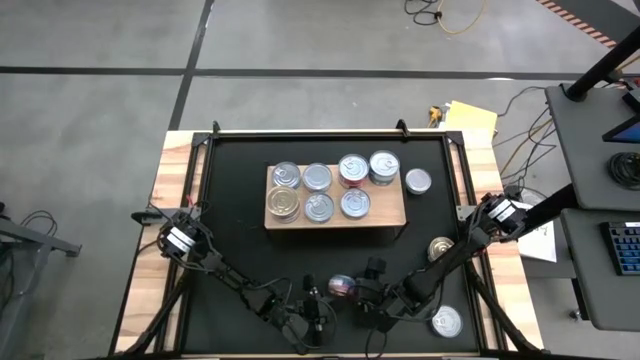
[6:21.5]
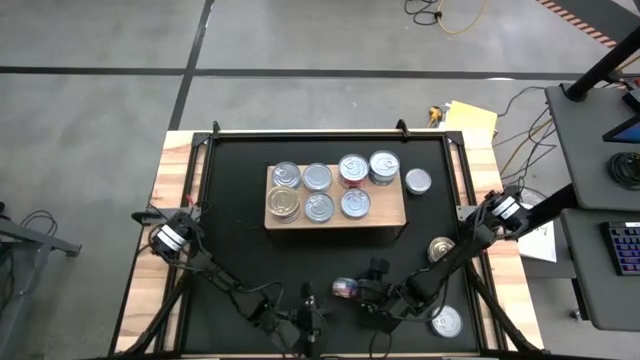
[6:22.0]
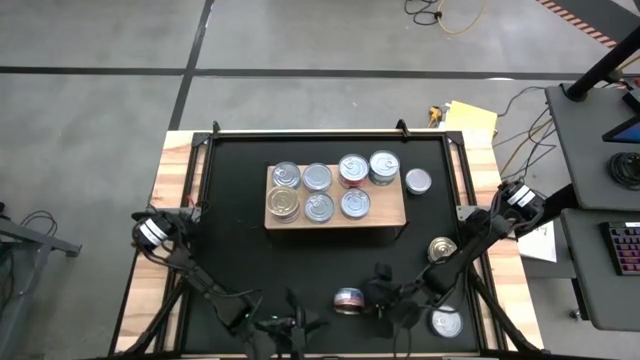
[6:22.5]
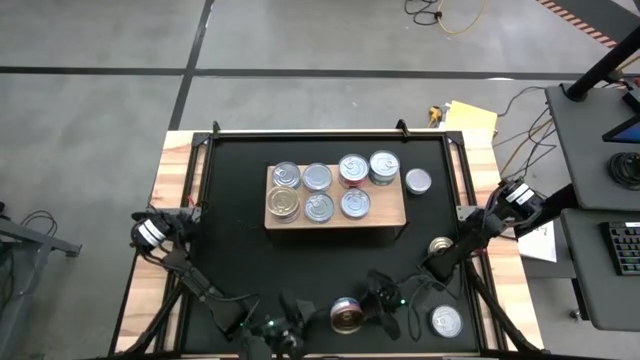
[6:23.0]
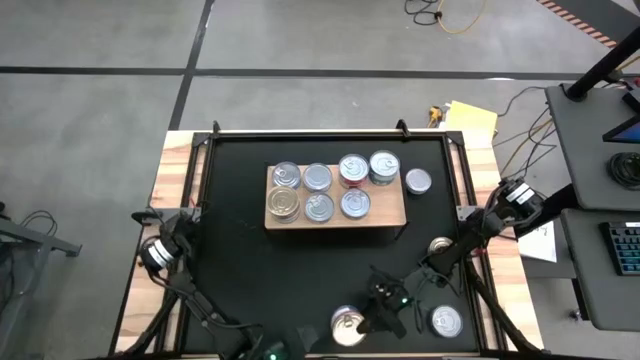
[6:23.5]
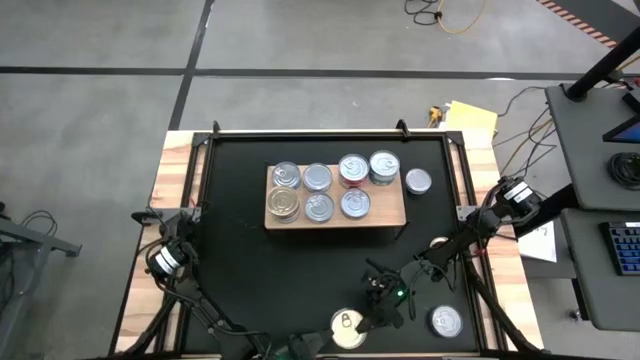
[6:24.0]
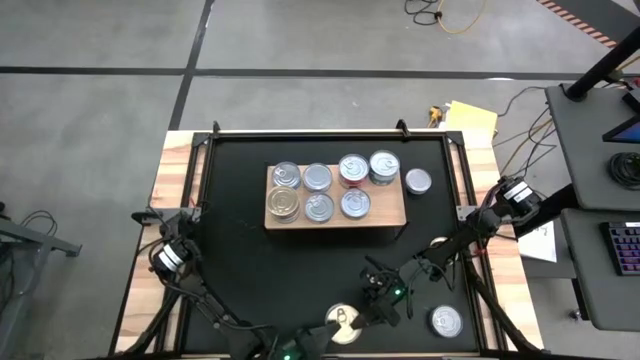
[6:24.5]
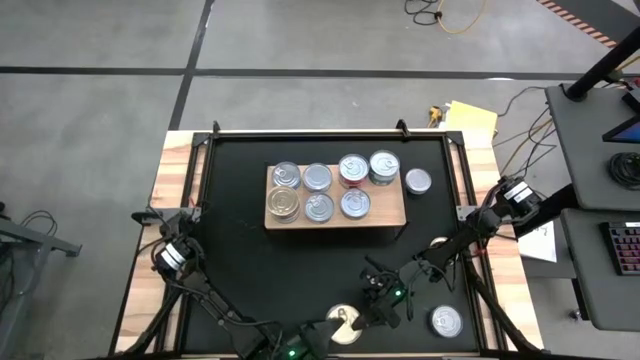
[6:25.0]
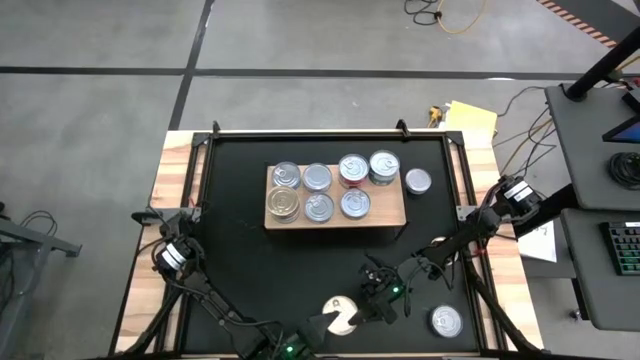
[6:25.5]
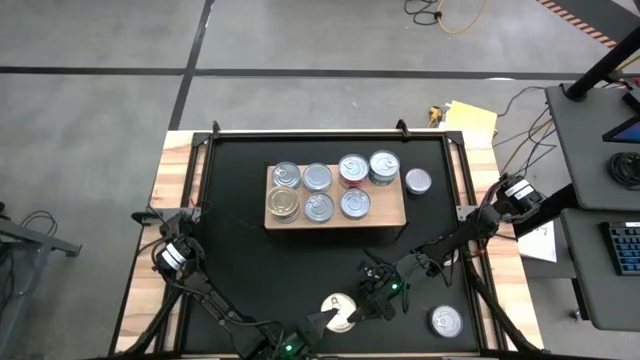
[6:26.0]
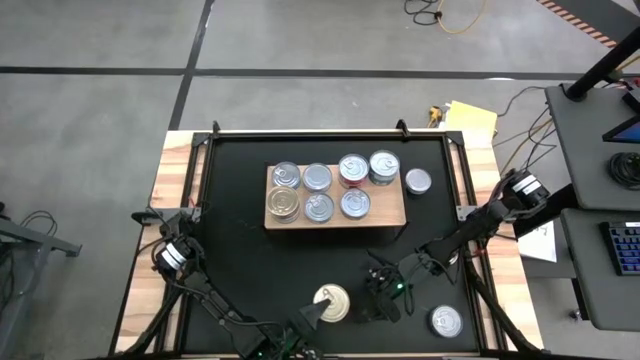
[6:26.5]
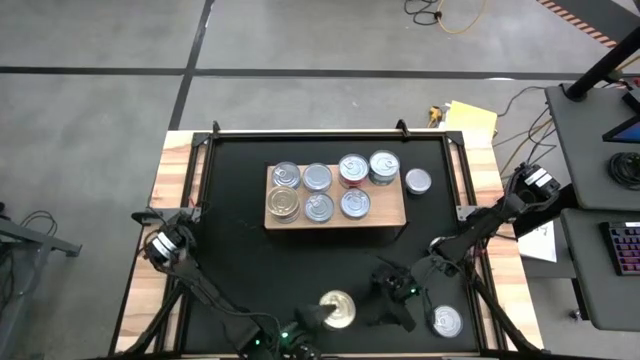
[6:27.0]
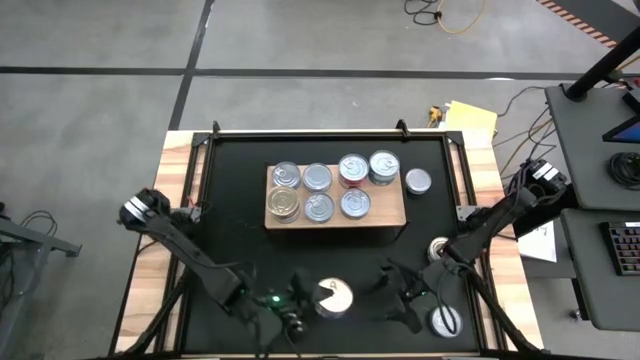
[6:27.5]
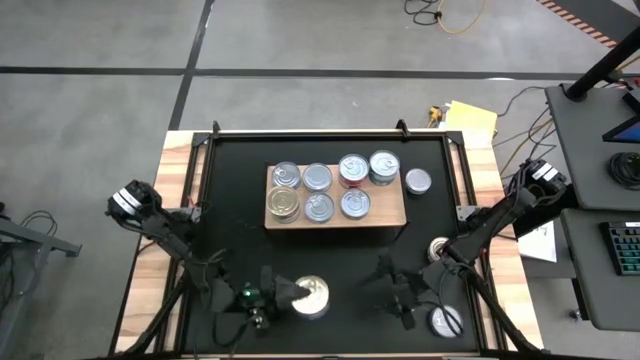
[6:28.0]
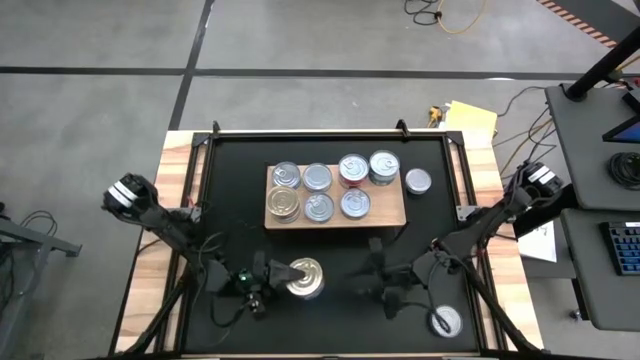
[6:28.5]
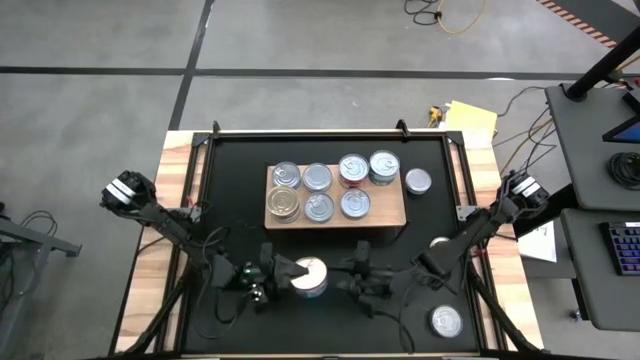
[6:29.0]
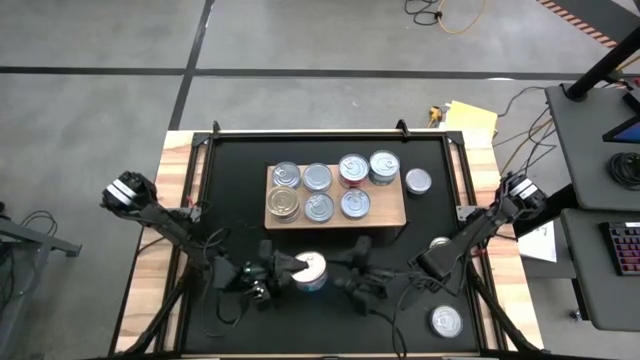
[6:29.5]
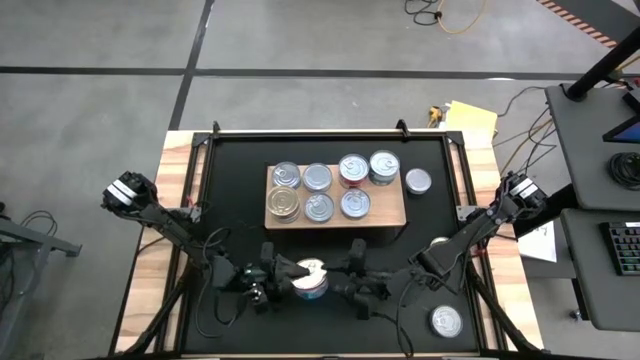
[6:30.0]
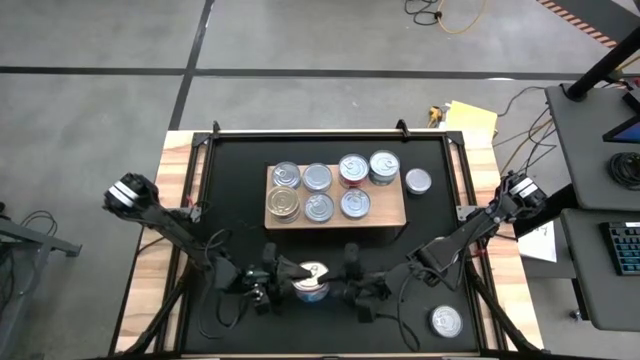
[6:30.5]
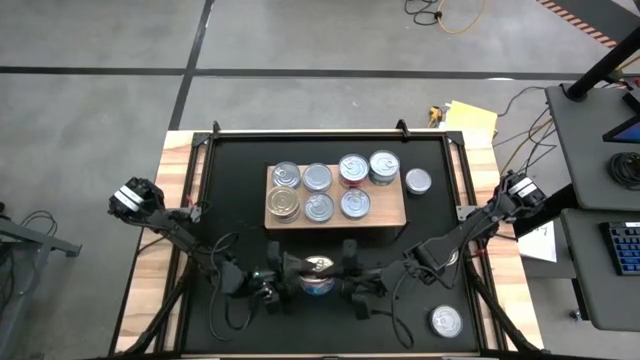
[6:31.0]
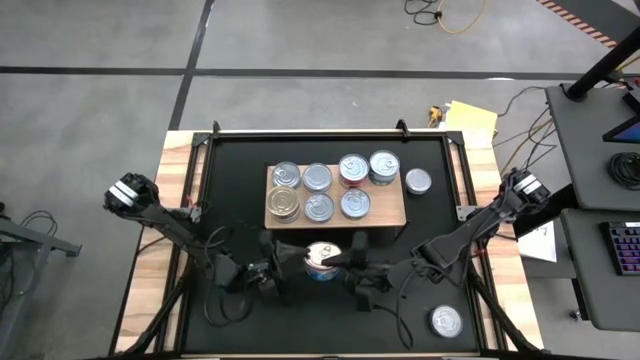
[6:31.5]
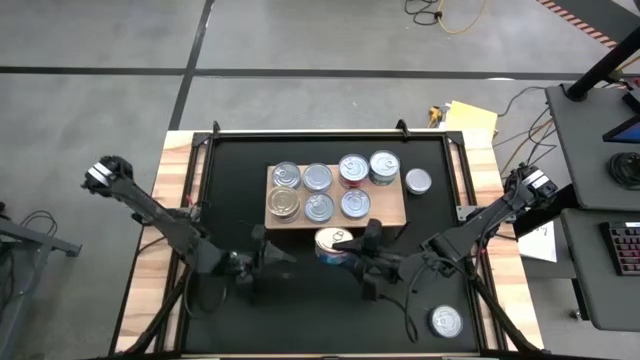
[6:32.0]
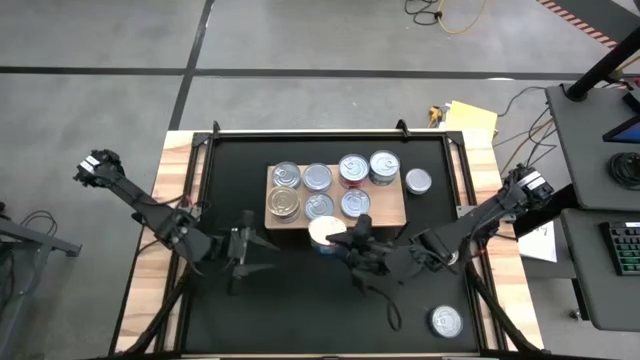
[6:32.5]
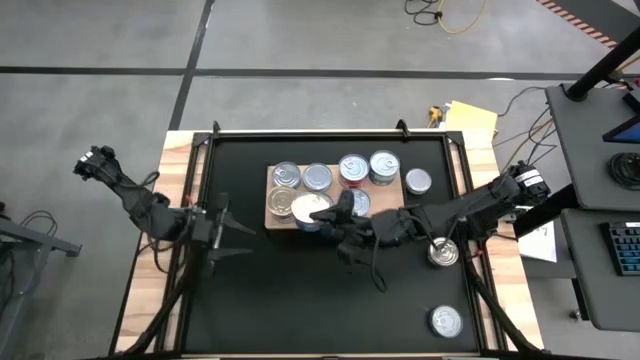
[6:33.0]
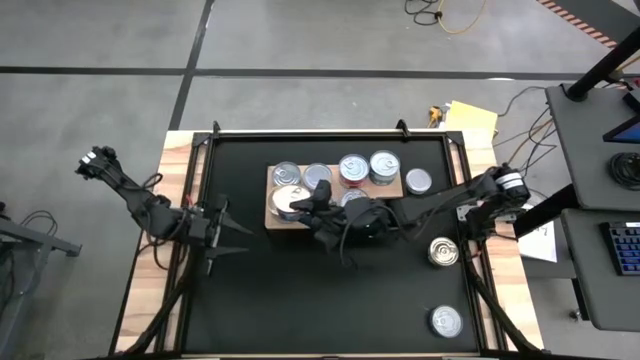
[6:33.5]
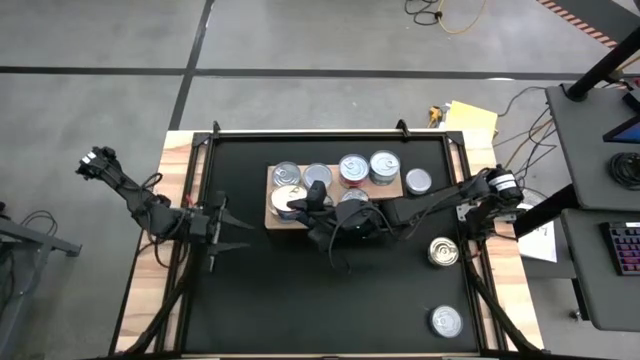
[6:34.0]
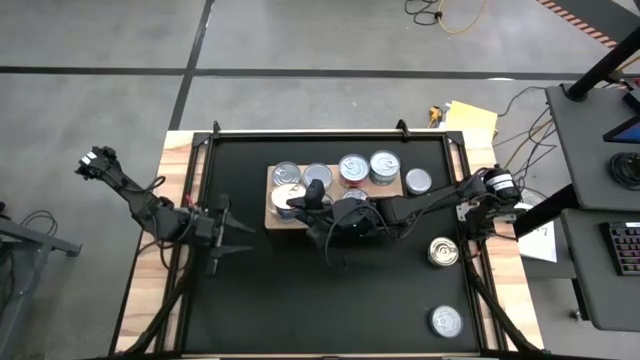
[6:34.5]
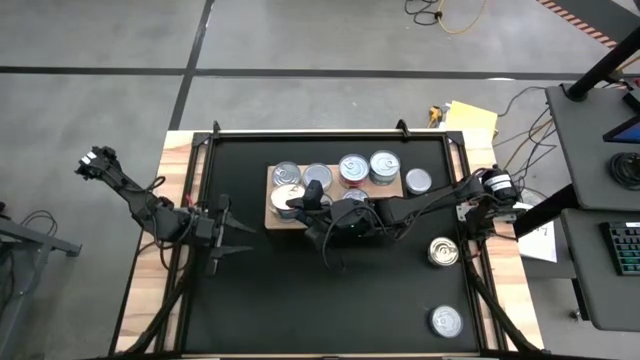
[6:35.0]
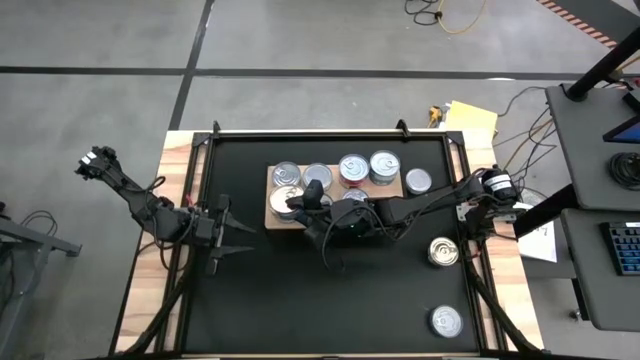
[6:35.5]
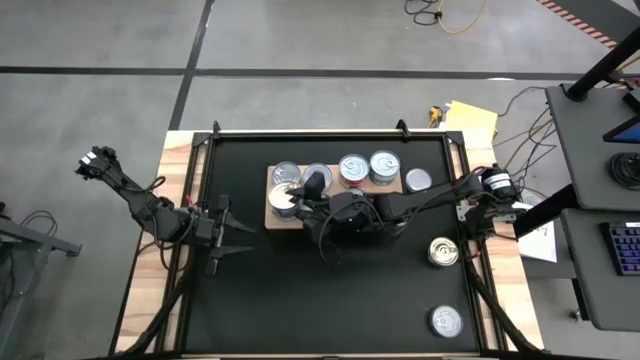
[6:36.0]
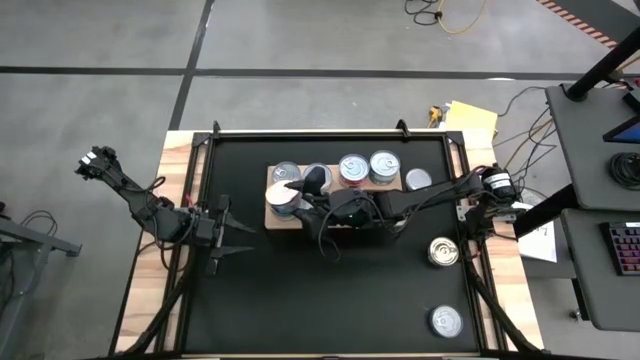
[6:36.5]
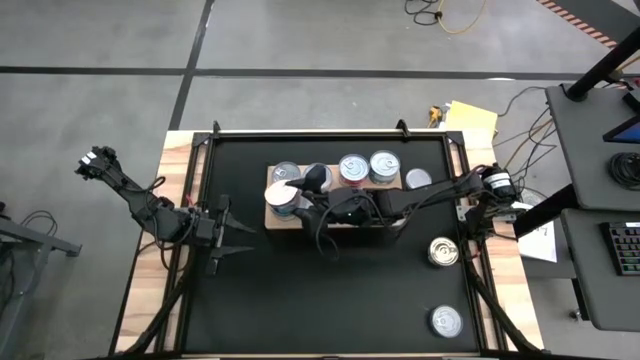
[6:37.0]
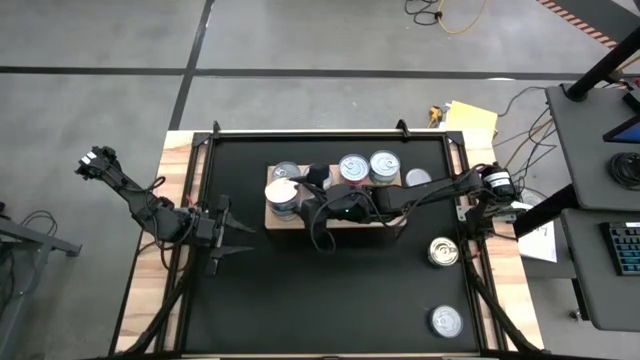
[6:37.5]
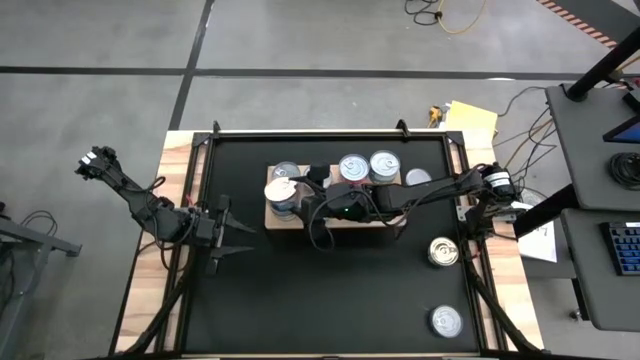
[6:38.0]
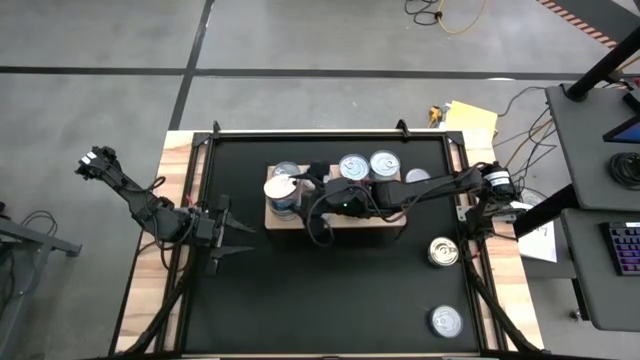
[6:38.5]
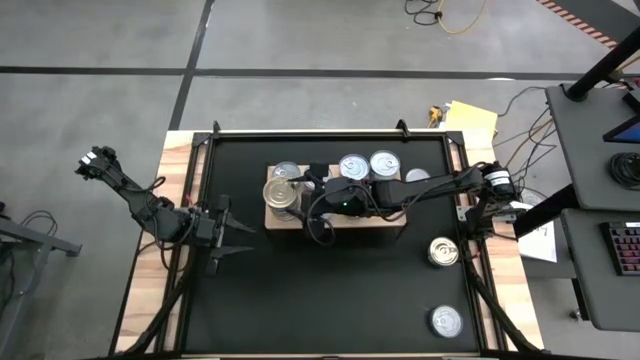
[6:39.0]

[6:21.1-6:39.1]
Task: Stack canned seafood by type on shelf
Stack the blue tuna can on the blue tuna can
